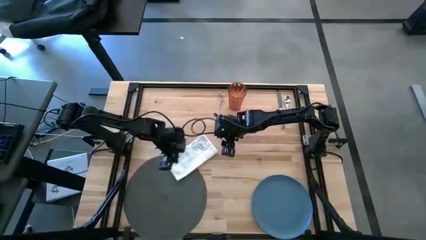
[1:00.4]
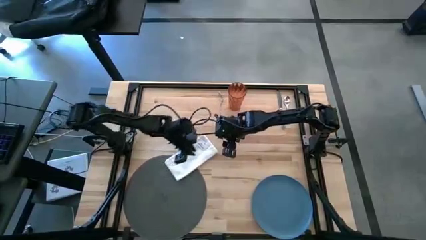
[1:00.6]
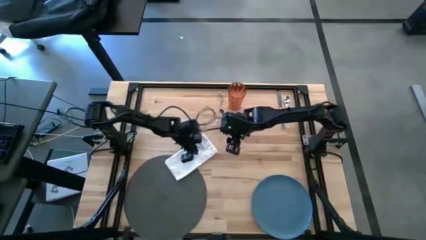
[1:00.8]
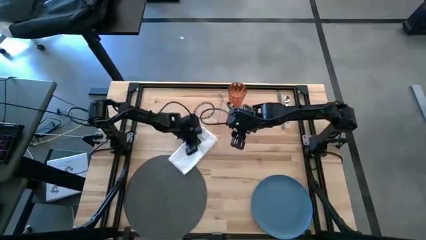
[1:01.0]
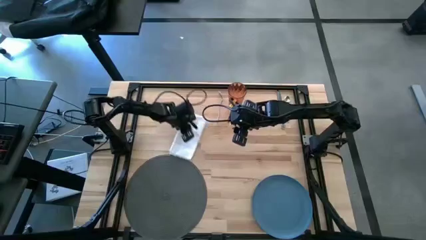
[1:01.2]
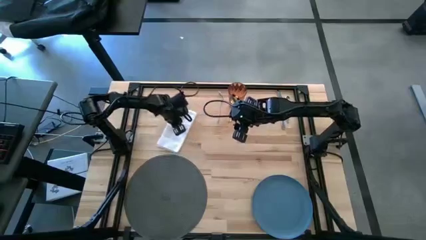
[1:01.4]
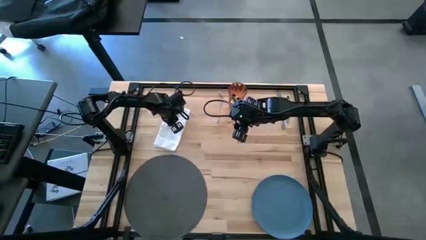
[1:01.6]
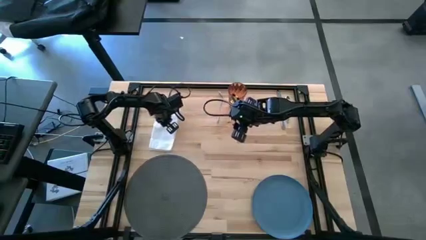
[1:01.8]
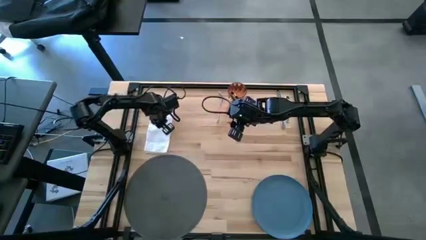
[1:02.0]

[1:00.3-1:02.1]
Task: Set table place
Move the white napkin to the top left of the table

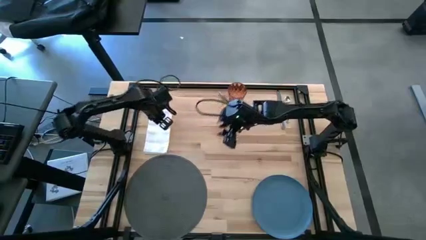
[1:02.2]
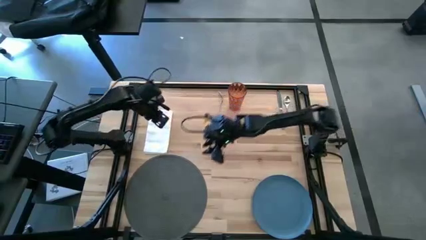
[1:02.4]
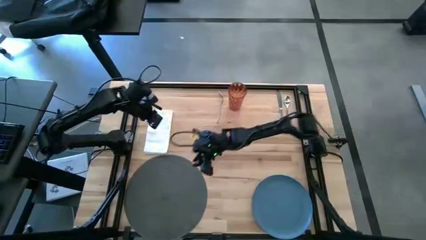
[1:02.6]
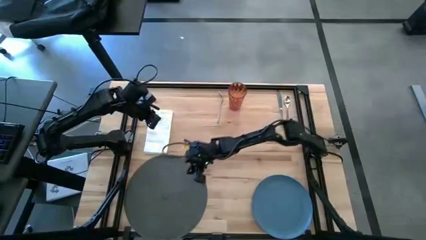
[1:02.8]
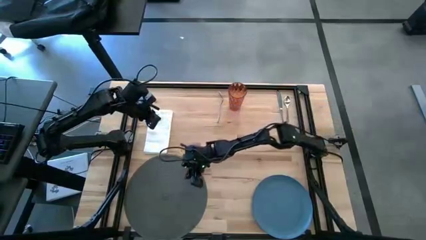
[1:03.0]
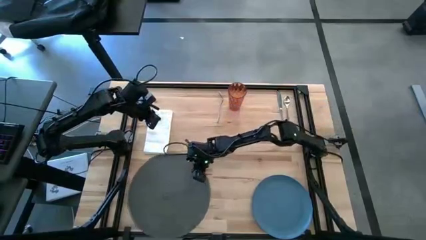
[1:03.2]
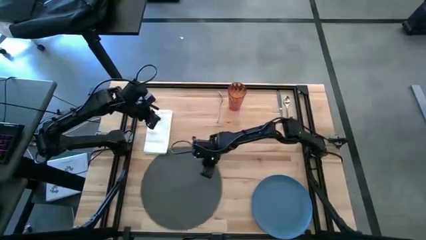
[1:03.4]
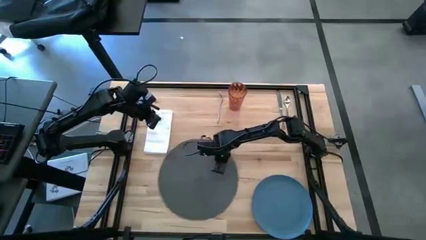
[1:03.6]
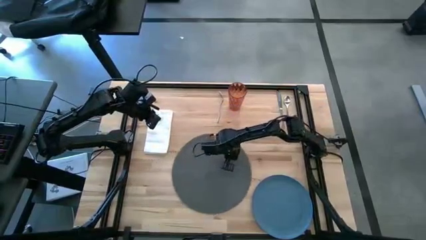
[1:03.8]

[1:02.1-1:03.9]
Move the gray mat to the center of the table

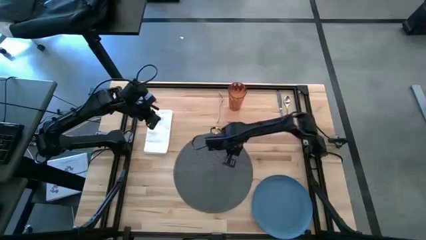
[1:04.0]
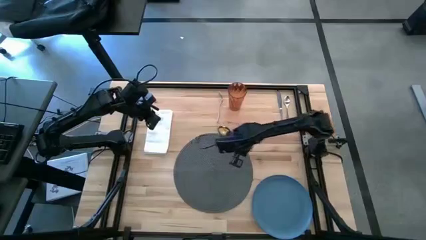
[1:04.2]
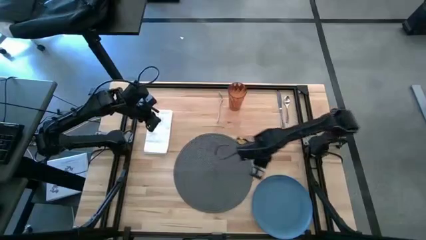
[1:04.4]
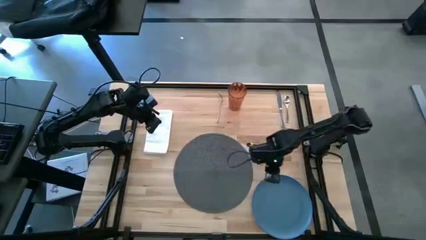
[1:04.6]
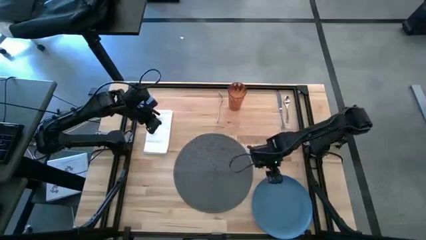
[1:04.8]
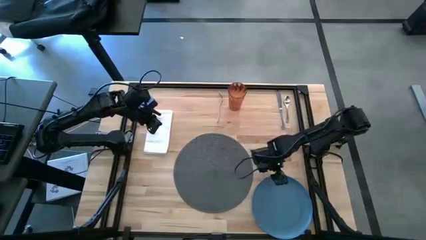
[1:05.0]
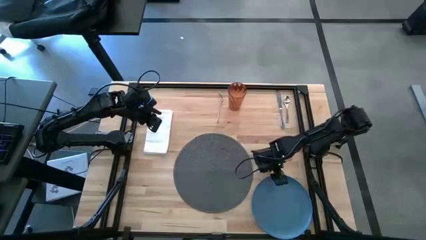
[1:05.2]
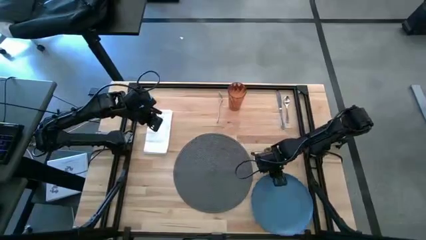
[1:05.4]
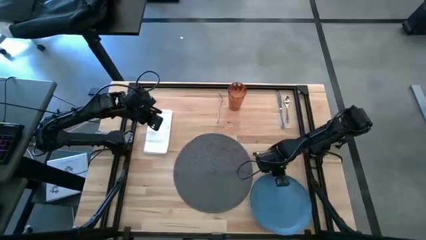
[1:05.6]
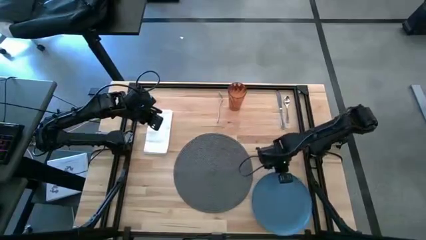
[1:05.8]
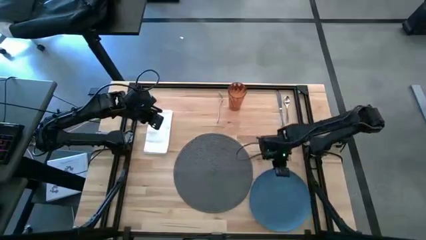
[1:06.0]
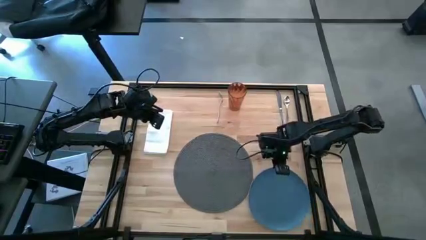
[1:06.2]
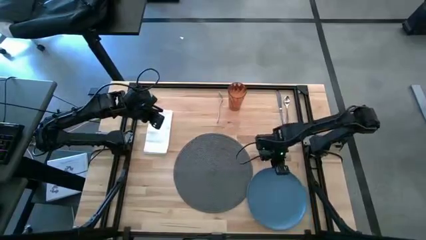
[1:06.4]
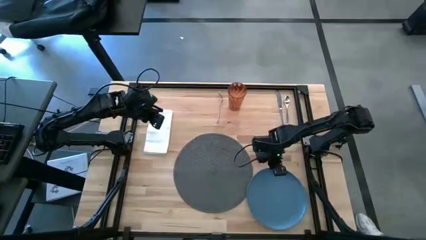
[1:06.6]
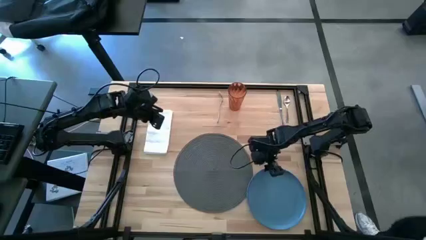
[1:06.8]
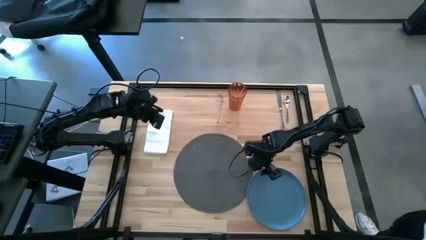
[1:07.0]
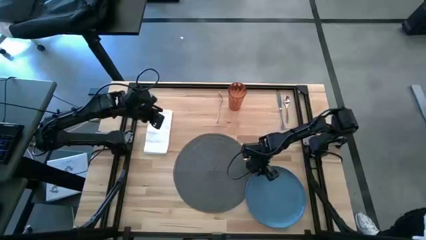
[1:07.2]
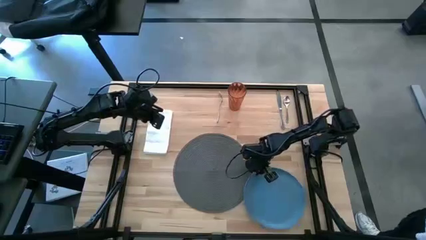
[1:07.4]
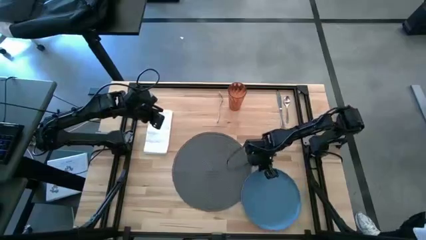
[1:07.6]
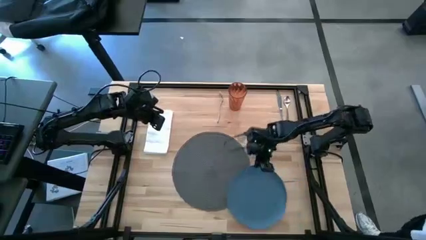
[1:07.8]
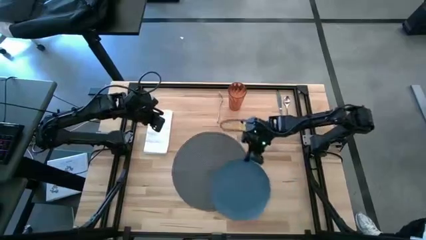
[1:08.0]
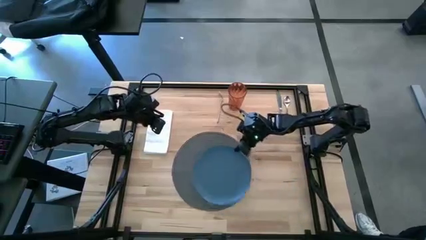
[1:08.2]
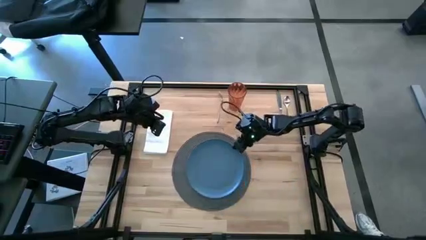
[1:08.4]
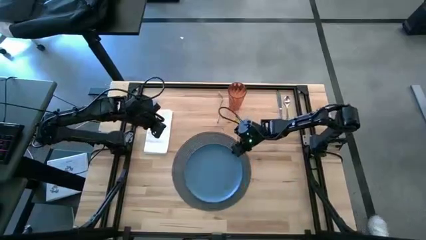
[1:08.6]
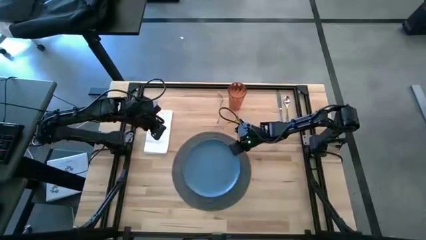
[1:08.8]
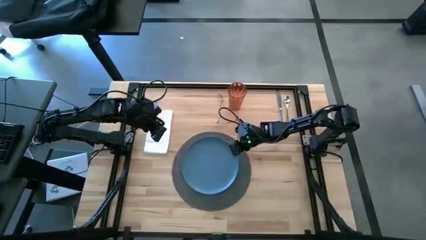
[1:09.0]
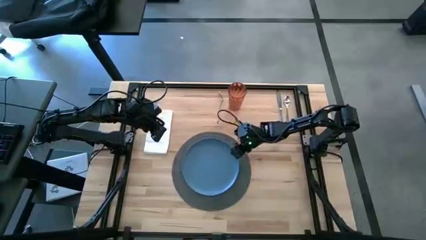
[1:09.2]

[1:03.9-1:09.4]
Put the blue plate on the gray mat

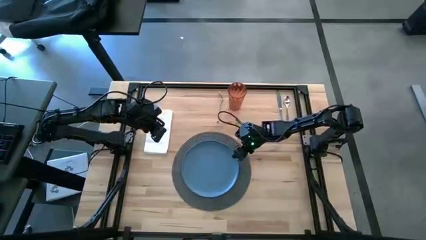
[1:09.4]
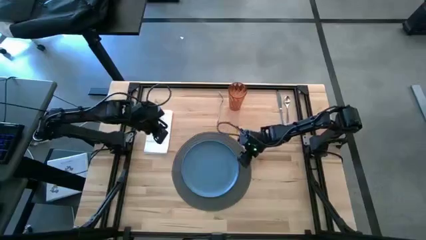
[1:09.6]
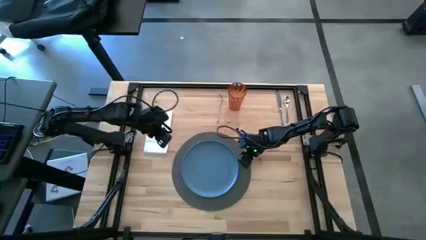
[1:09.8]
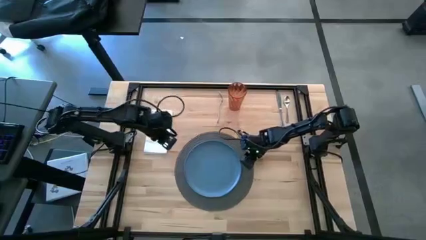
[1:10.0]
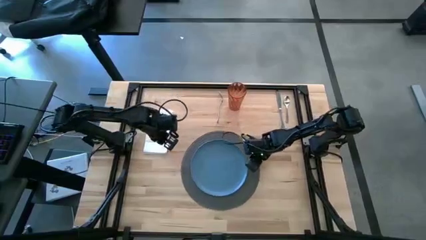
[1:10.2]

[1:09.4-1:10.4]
Adjust the gray mat

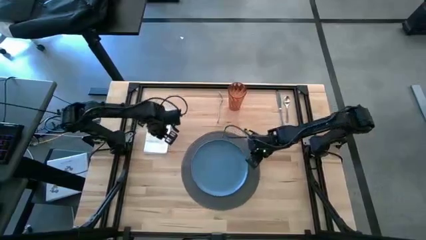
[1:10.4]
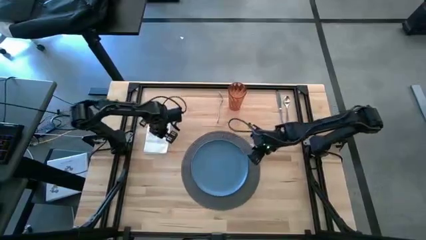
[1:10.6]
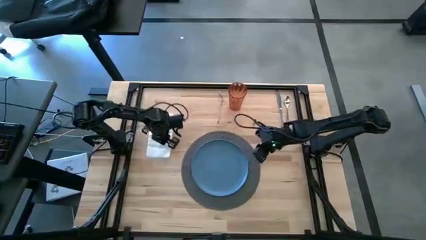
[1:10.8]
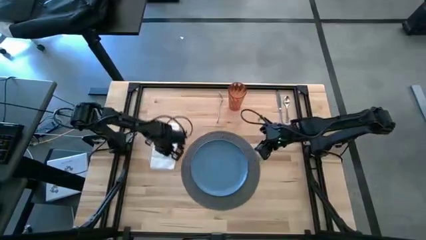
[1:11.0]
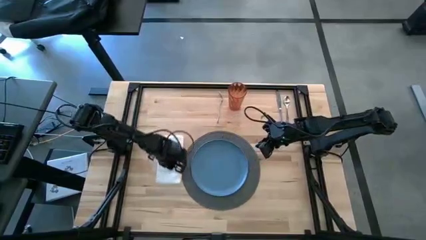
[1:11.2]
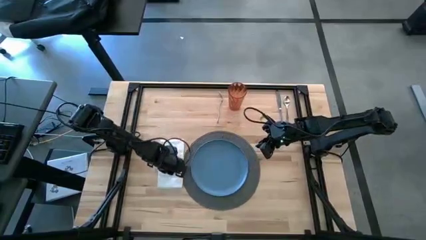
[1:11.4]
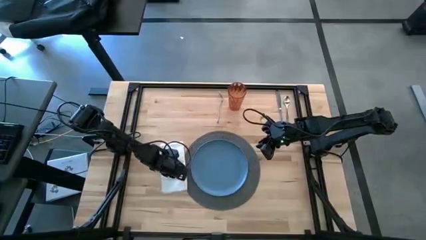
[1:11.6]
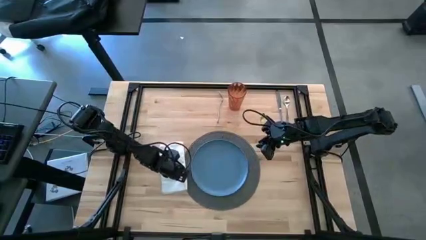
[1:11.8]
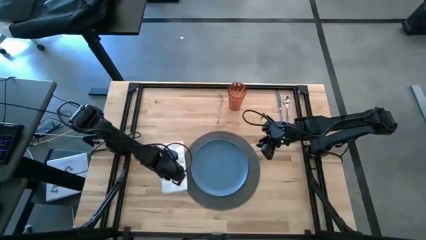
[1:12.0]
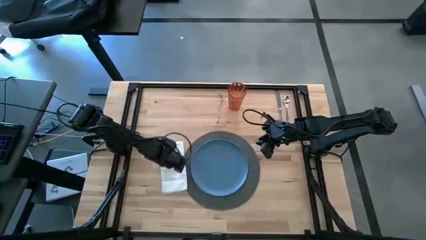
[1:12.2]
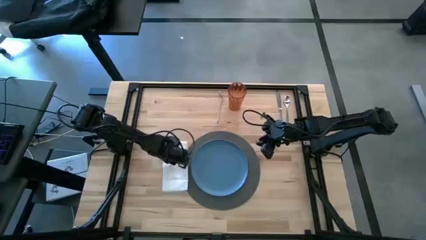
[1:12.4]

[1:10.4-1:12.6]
Move the white napkin to the middle left of the table

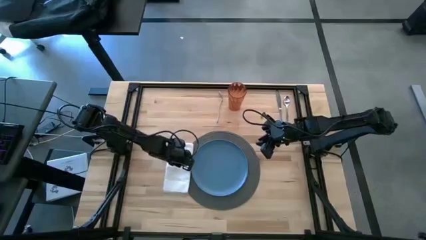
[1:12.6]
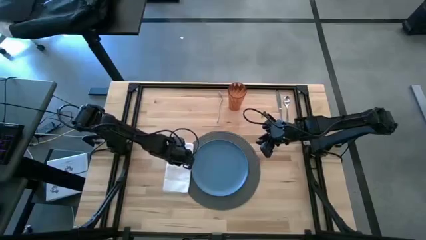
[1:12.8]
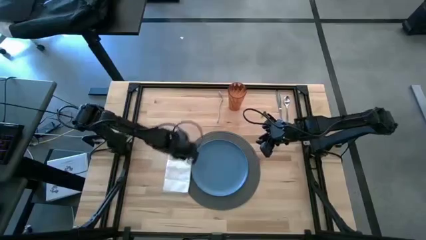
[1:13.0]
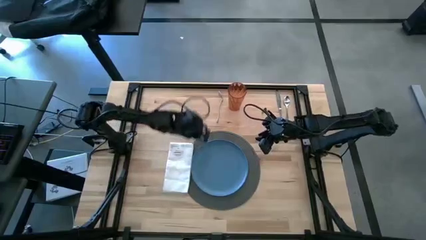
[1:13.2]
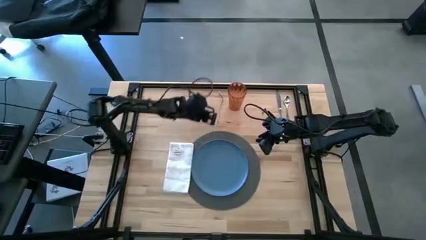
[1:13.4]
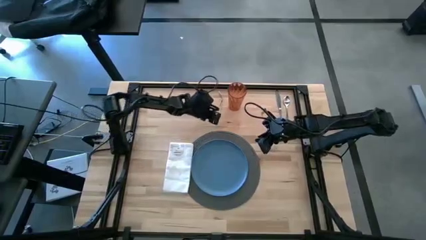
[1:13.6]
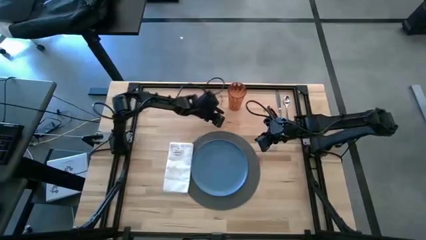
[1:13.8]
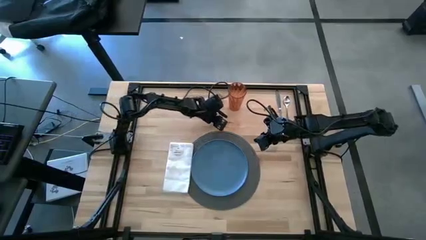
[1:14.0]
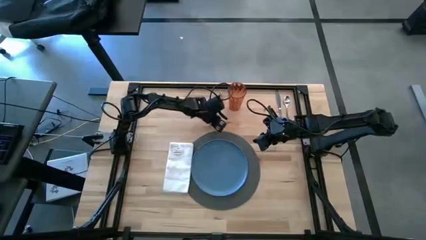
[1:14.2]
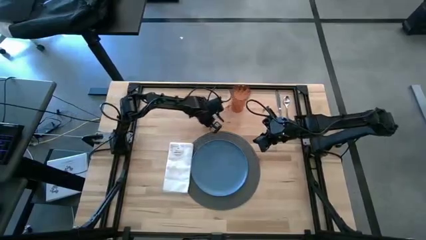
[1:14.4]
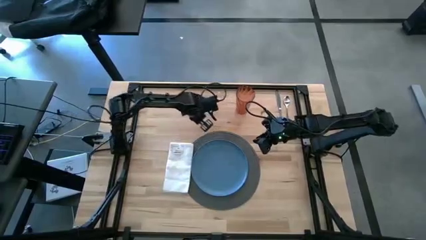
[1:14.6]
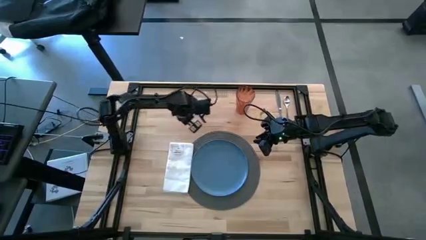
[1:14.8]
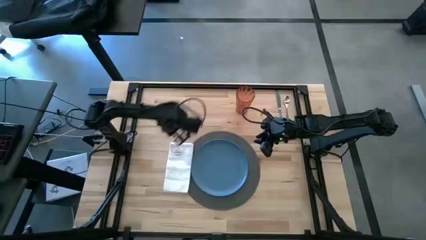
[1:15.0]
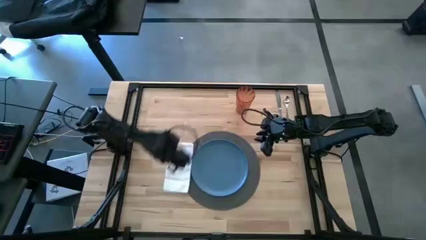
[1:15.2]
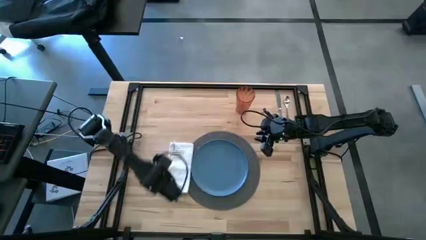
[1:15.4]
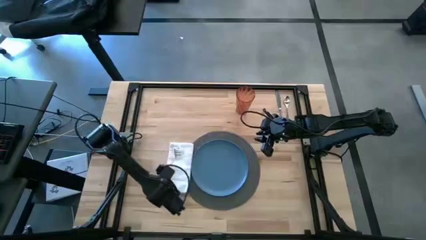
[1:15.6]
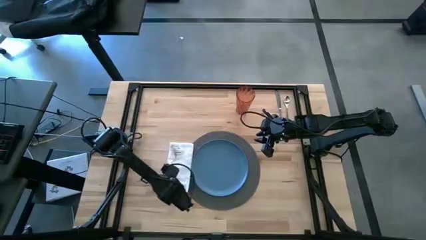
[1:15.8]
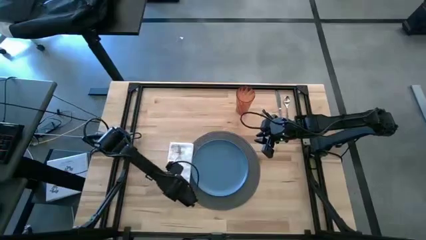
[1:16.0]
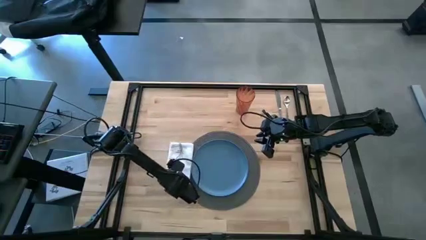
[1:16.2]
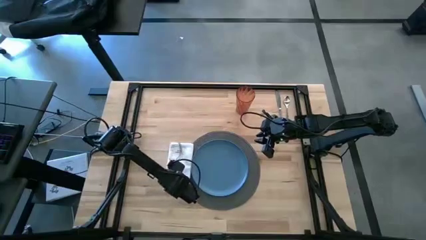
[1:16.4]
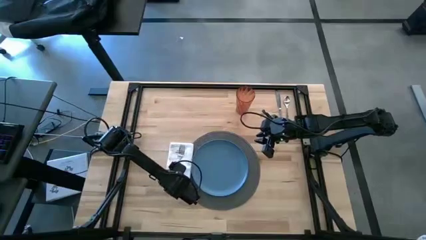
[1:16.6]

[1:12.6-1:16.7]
Put the silver fork on the white napkin
